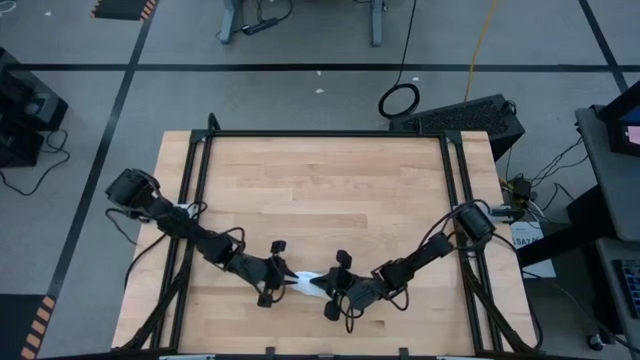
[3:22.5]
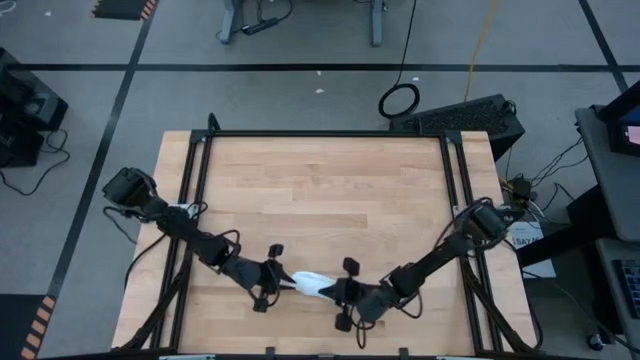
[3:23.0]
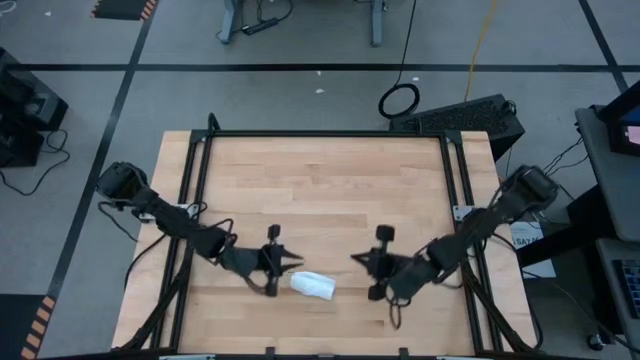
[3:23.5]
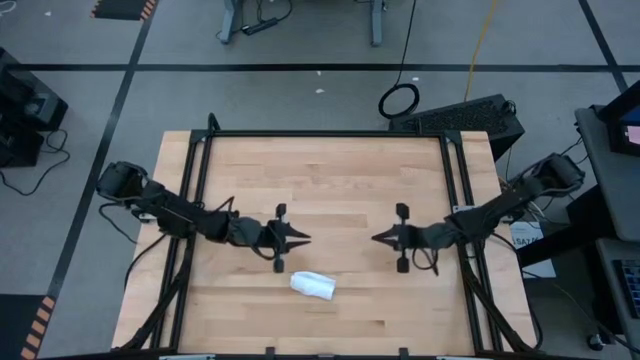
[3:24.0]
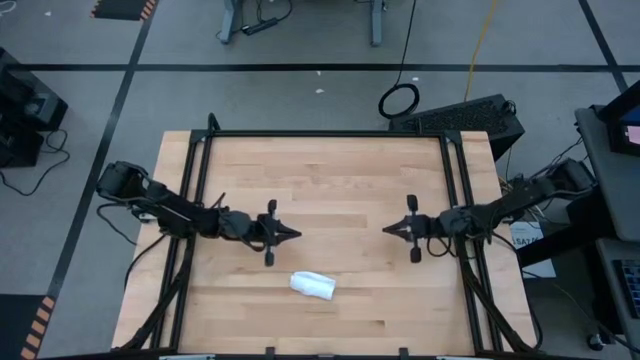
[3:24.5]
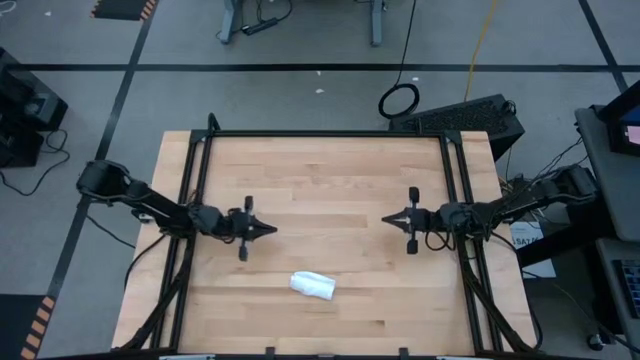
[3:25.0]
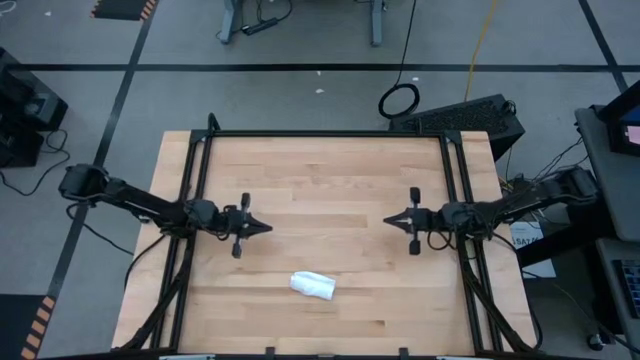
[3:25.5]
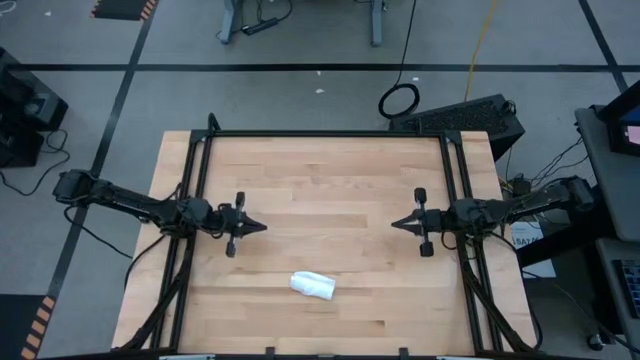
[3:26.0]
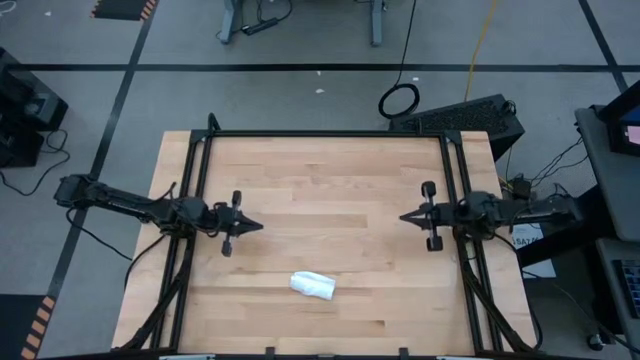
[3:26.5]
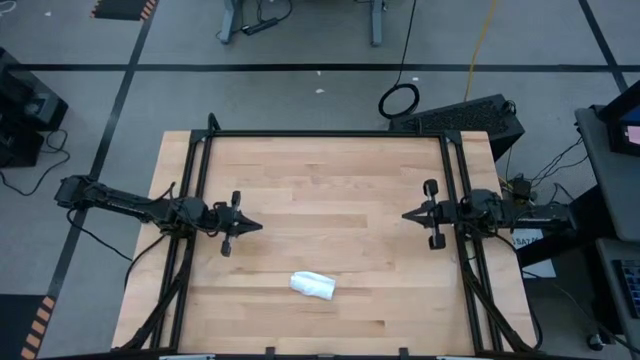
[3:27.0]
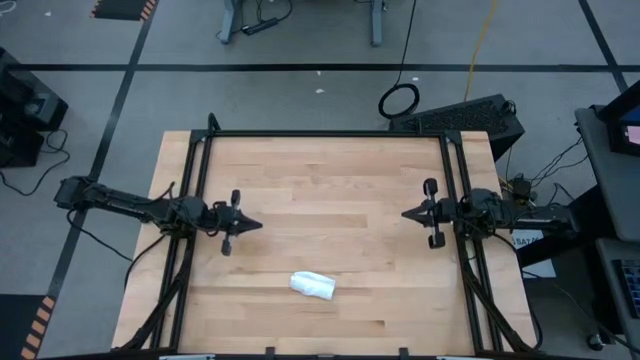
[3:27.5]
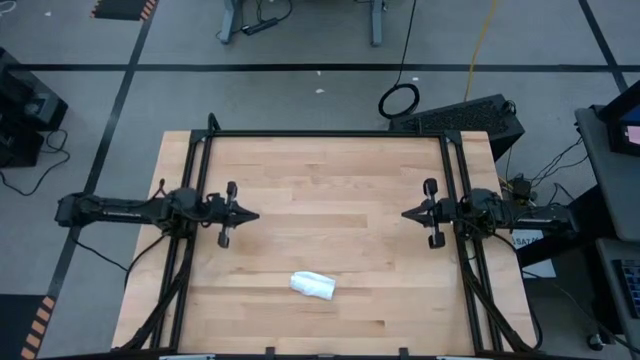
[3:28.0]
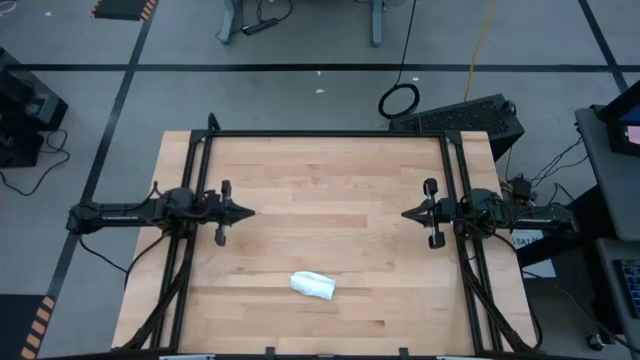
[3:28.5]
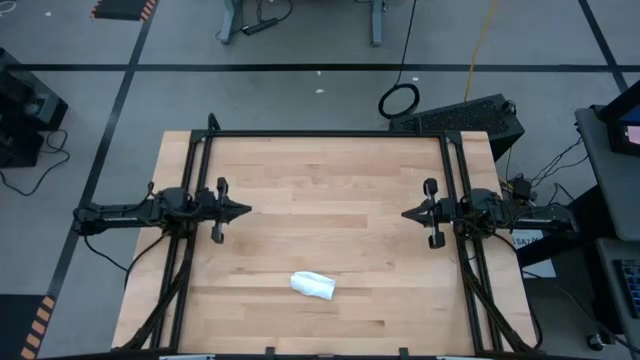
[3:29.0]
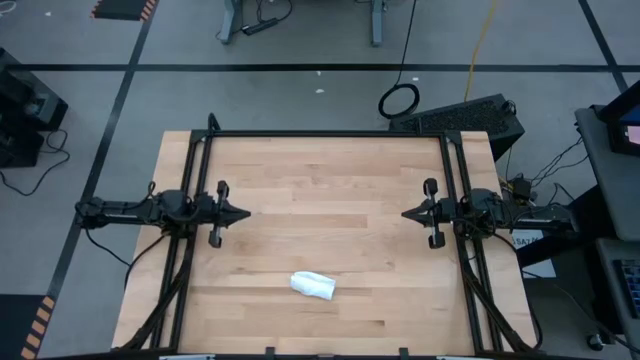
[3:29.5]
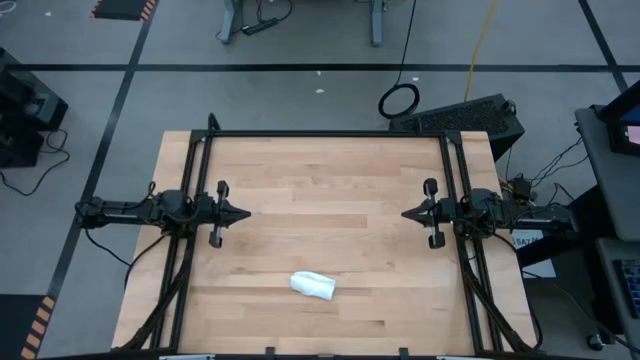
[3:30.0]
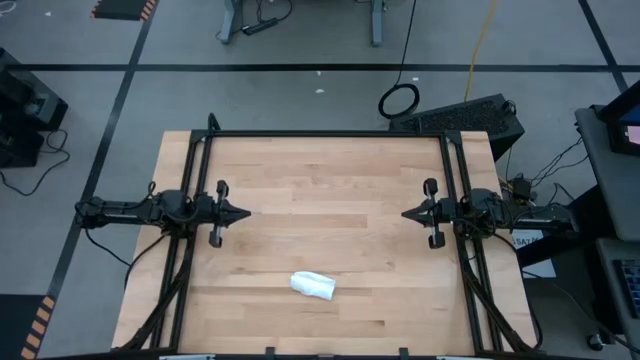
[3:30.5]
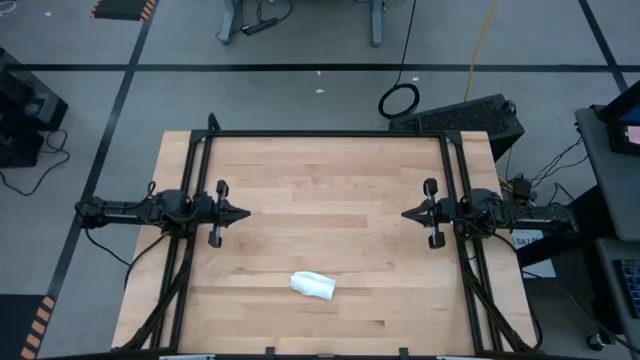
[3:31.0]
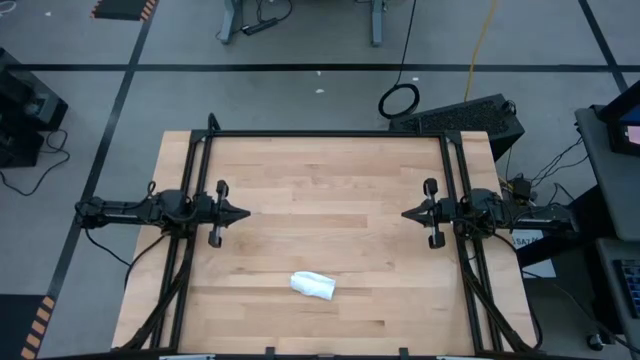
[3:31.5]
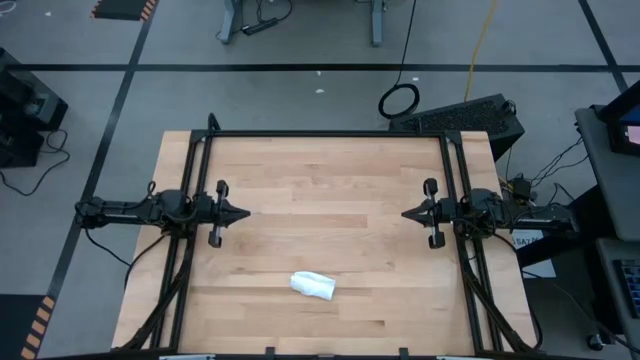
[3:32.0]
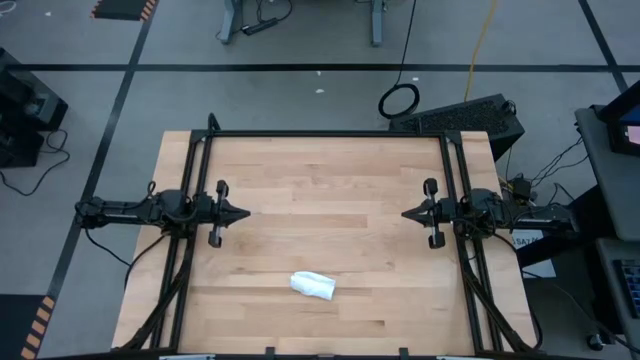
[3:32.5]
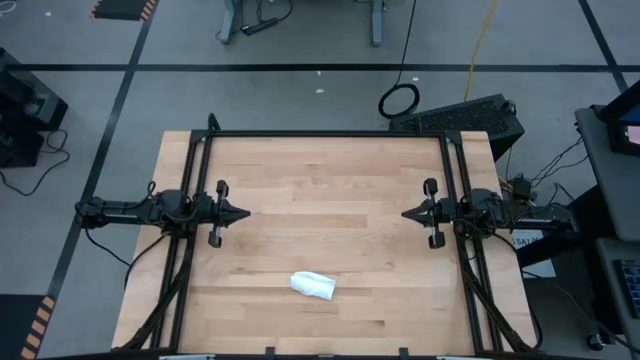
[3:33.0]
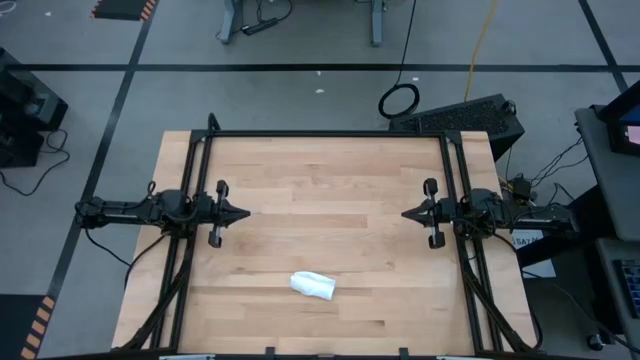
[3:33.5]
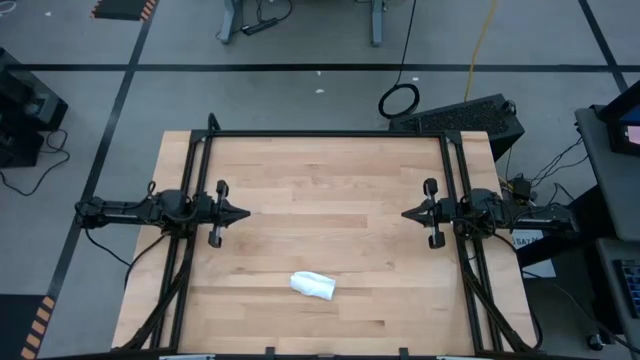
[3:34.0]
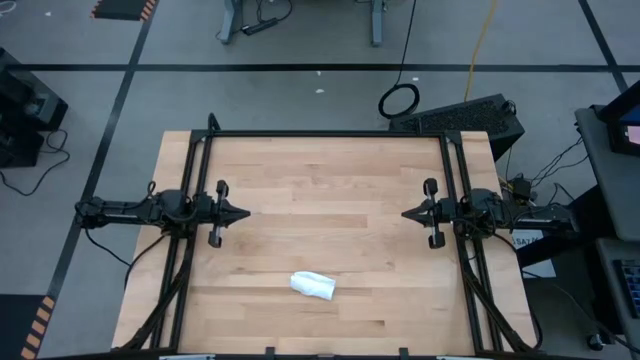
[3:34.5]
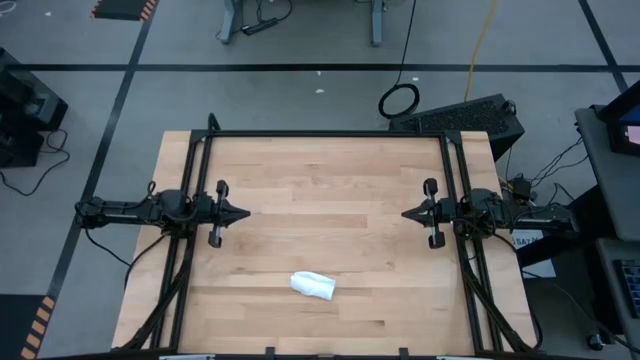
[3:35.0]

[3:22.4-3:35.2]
Task: Roll napkin
Return to Home Position

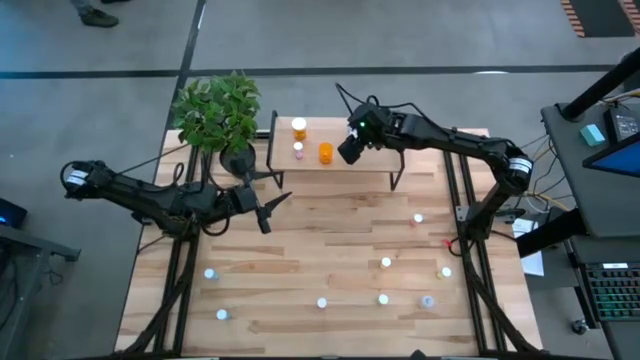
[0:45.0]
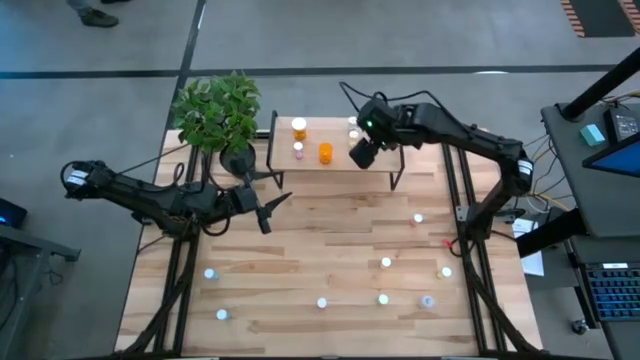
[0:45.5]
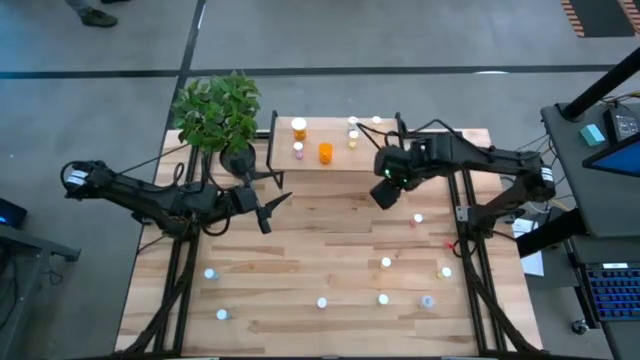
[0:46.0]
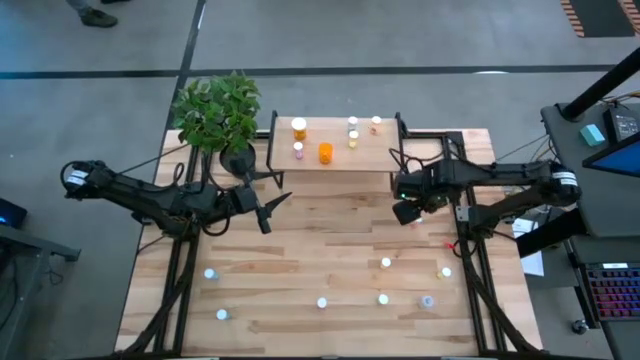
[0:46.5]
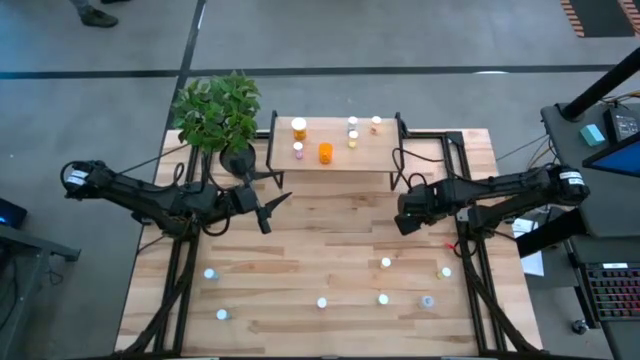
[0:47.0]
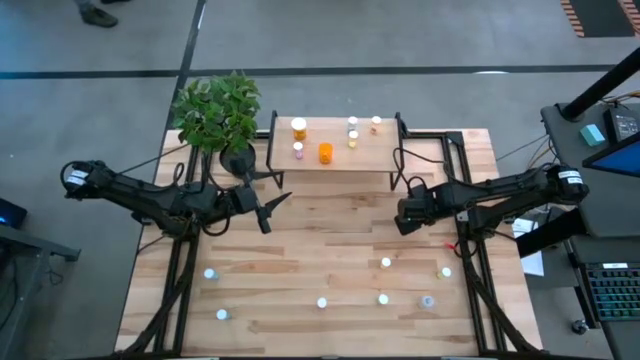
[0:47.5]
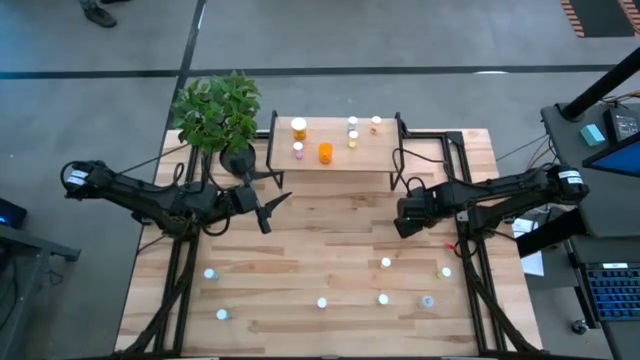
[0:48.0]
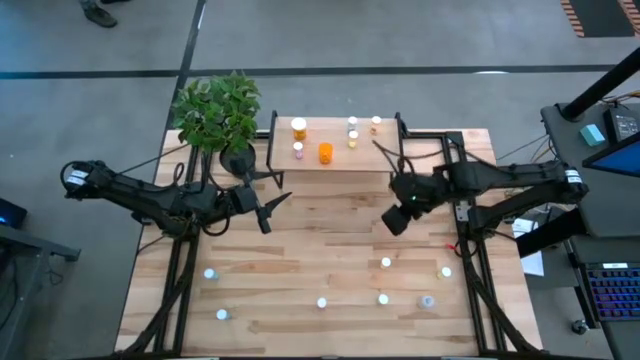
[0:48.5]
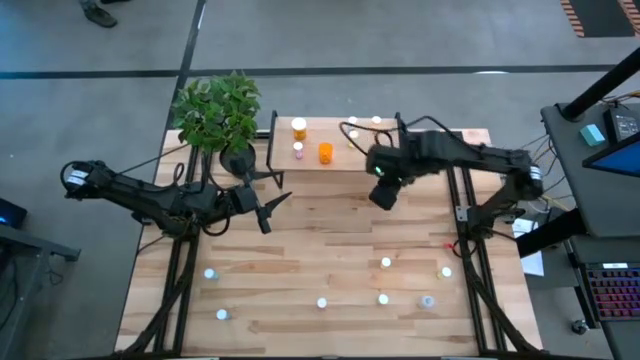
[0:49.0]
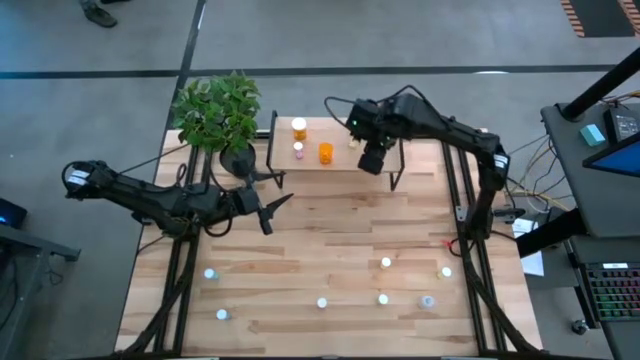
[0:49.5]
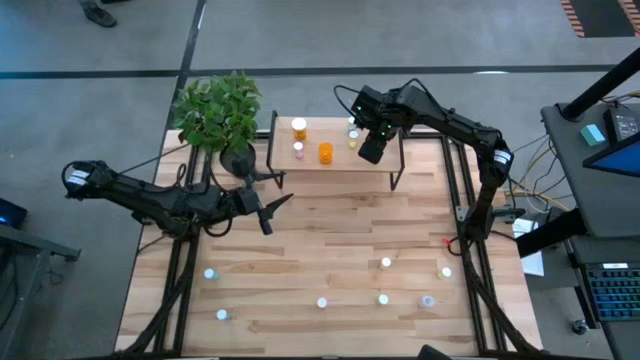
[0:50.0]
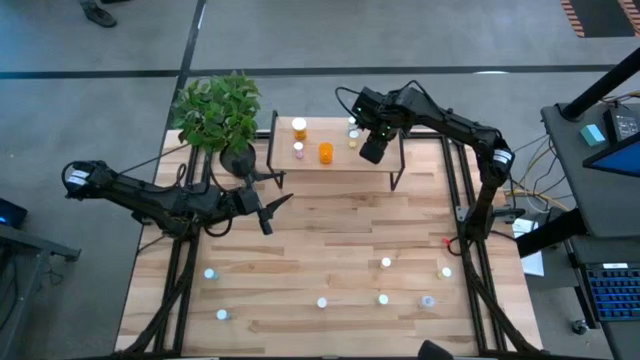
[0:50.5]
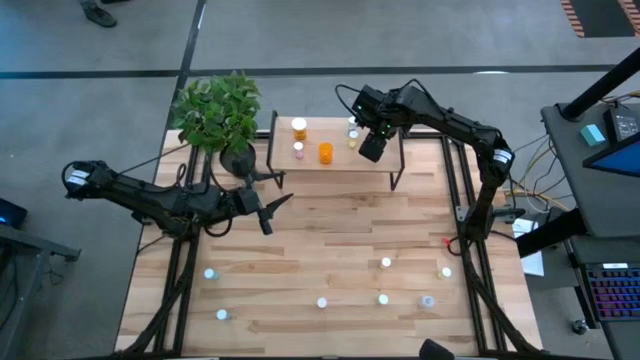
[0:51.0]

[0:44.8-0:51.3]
Task: Pick and place medicine bottles onto shelf by color
Put the red pill bottle on the shelf

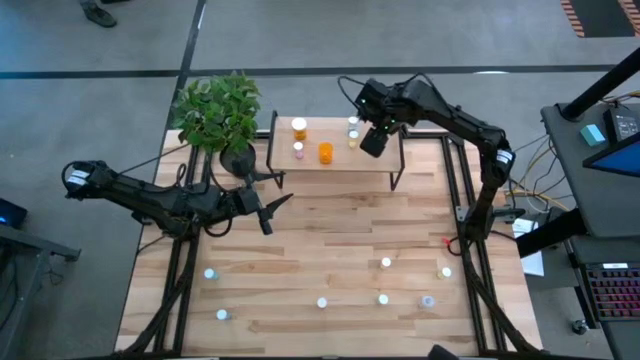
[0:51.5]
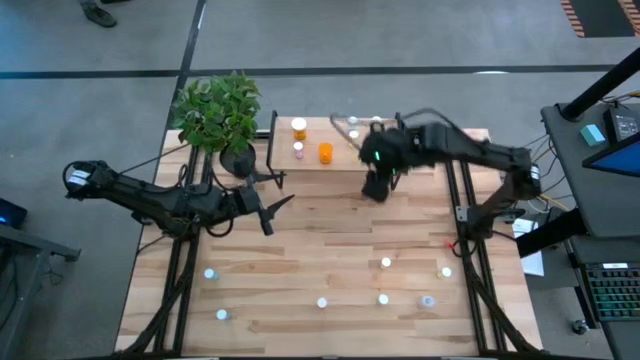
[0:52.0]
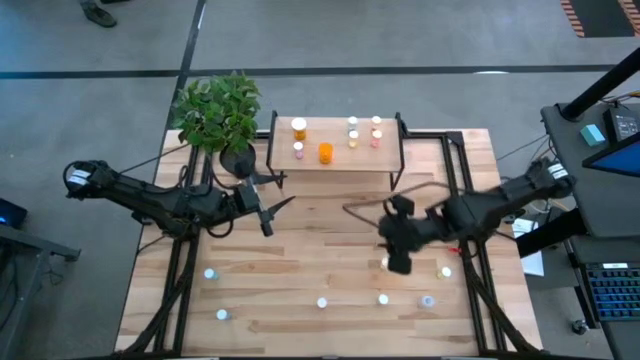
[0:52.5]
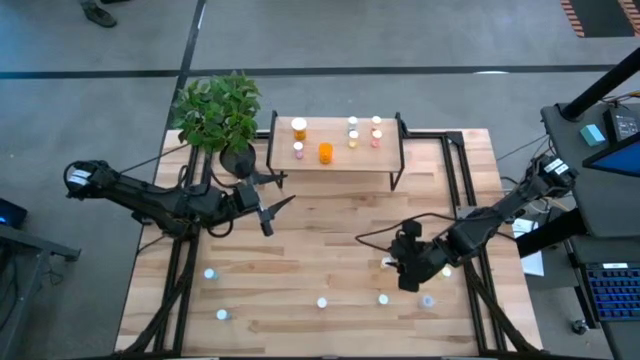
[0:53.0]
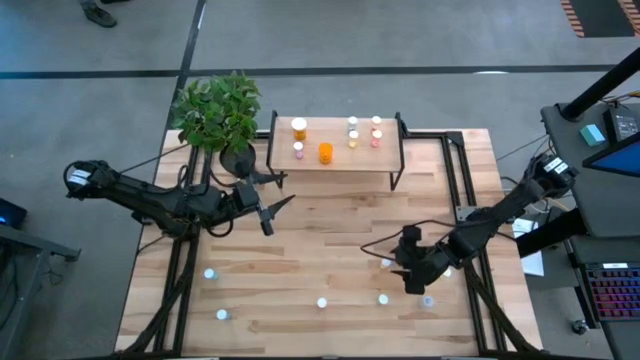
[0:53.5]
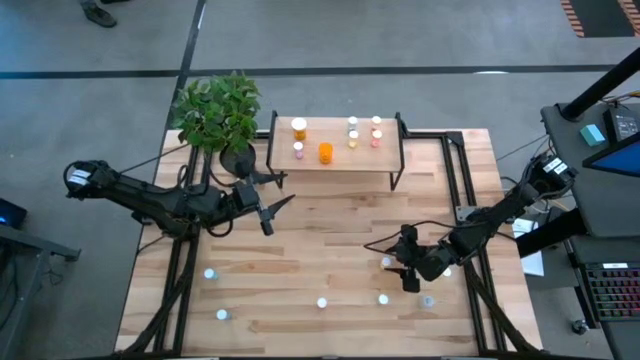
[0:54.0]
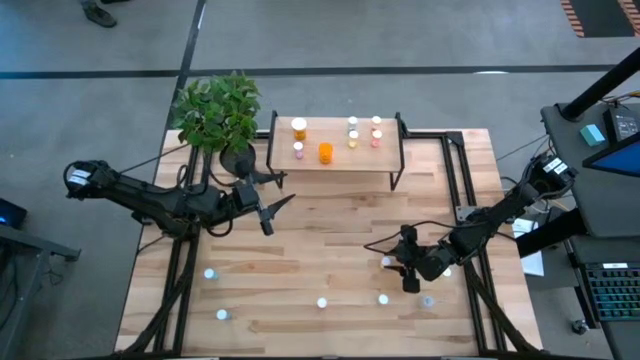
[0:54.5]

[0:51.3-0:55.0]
Put the yellow pill bottle on the shelf
